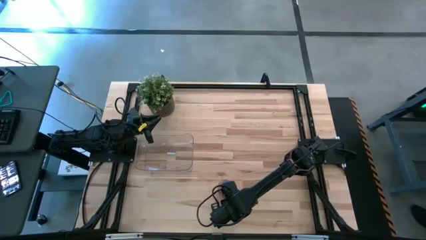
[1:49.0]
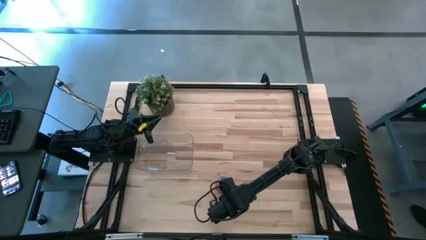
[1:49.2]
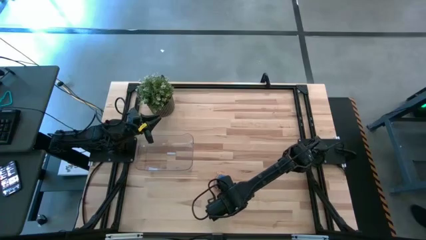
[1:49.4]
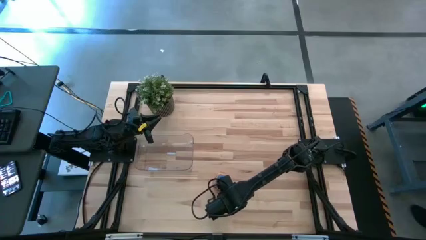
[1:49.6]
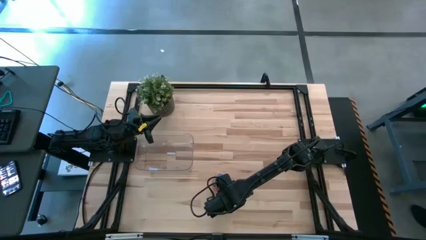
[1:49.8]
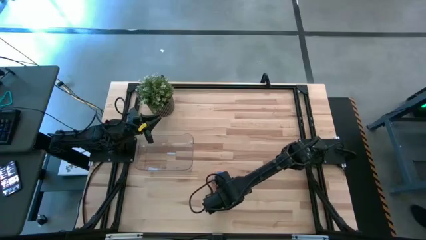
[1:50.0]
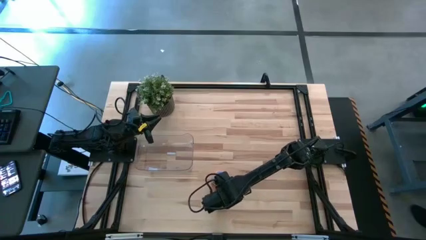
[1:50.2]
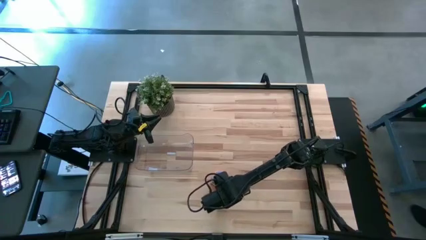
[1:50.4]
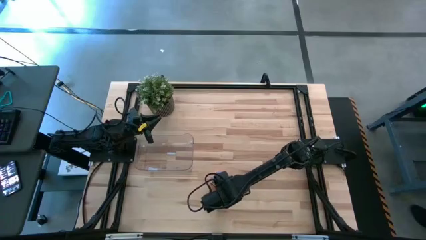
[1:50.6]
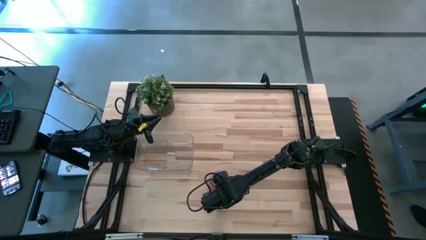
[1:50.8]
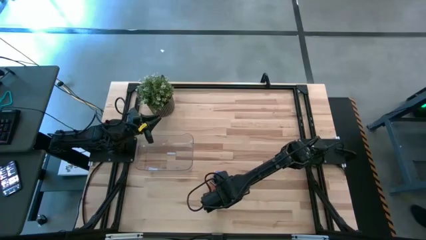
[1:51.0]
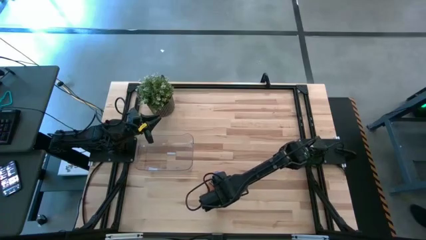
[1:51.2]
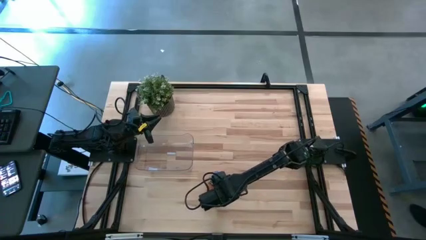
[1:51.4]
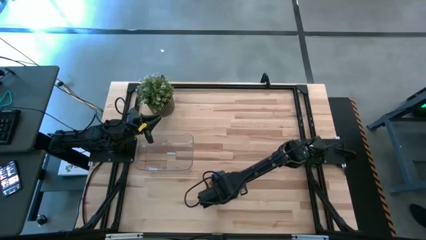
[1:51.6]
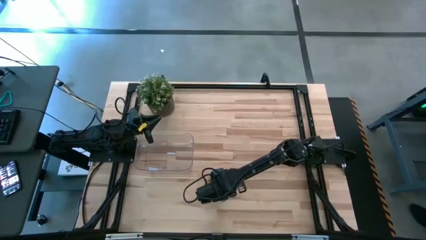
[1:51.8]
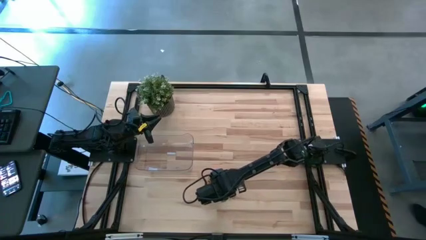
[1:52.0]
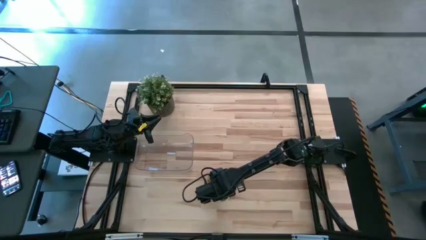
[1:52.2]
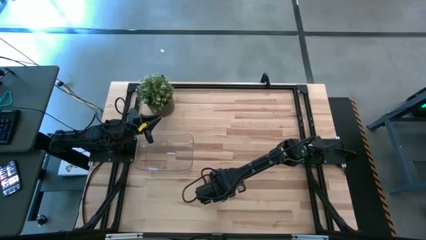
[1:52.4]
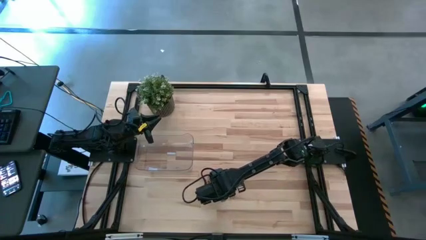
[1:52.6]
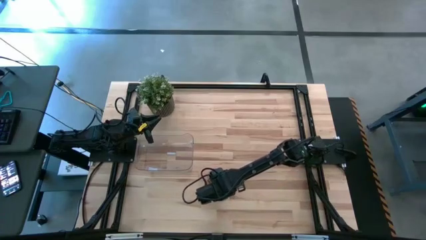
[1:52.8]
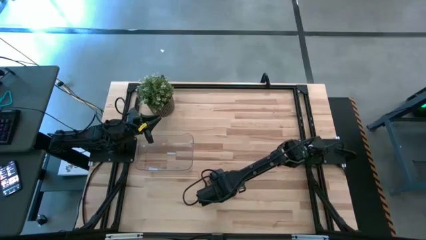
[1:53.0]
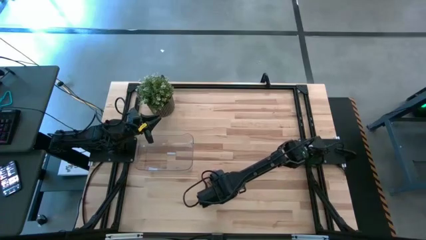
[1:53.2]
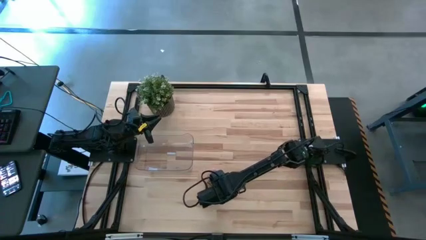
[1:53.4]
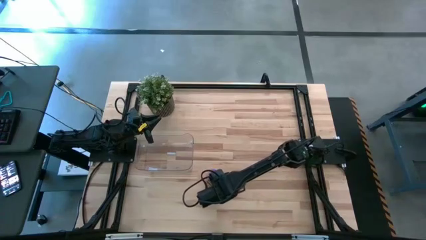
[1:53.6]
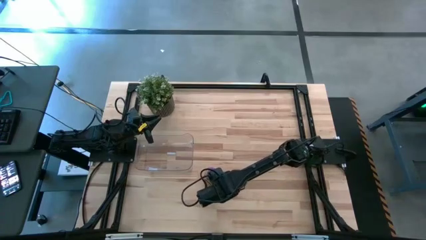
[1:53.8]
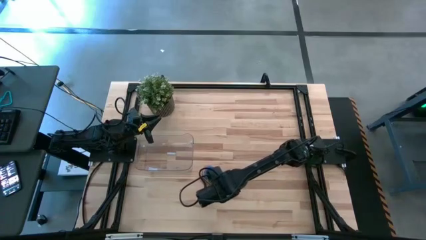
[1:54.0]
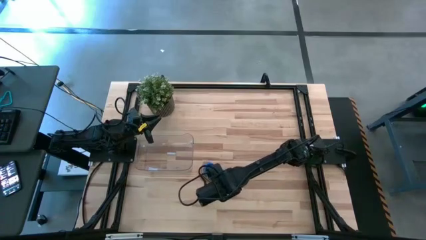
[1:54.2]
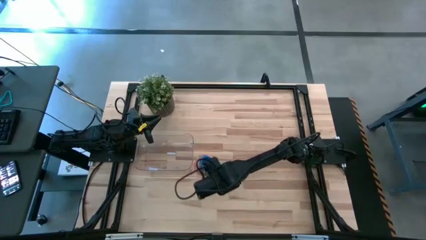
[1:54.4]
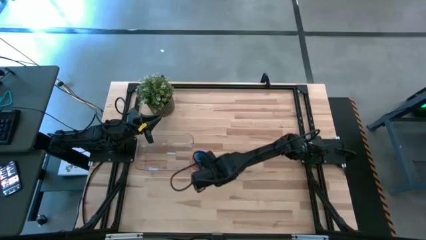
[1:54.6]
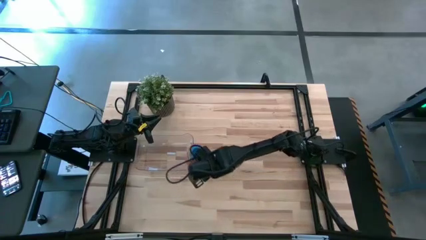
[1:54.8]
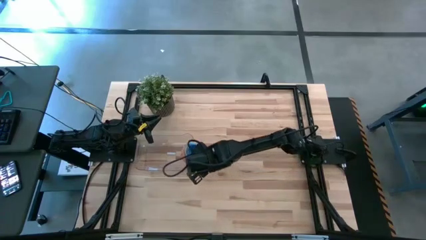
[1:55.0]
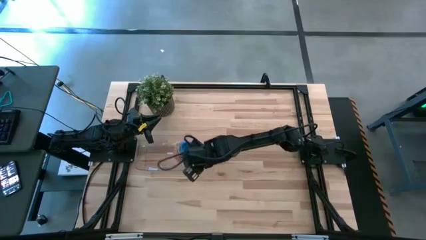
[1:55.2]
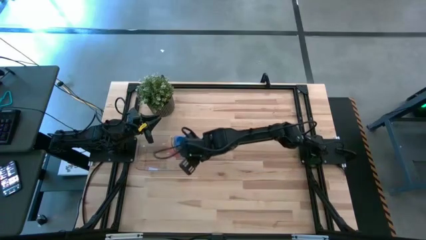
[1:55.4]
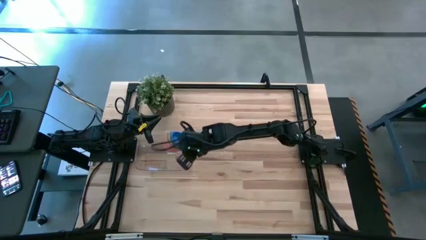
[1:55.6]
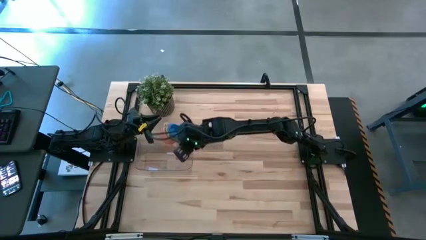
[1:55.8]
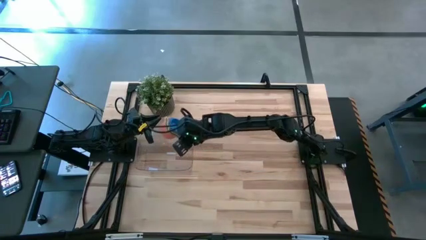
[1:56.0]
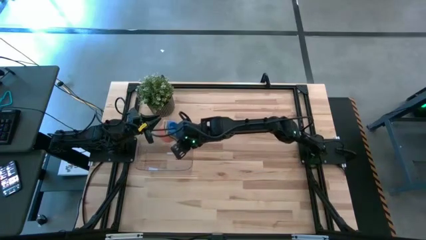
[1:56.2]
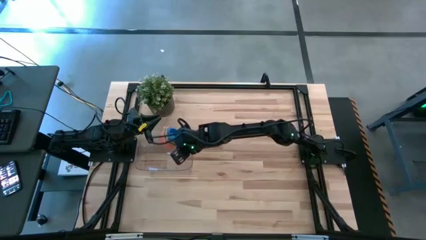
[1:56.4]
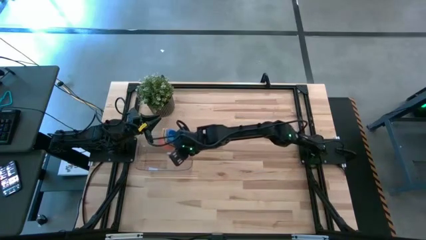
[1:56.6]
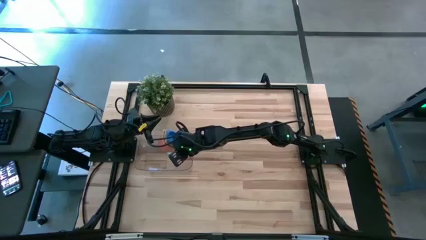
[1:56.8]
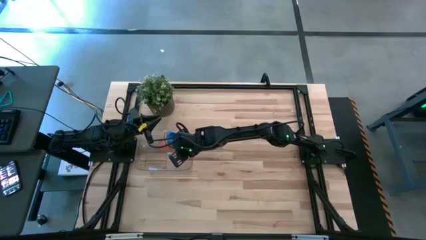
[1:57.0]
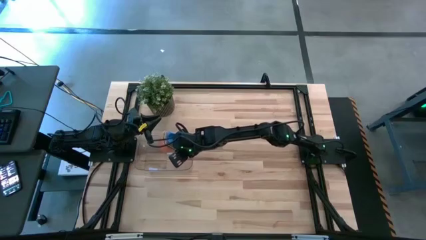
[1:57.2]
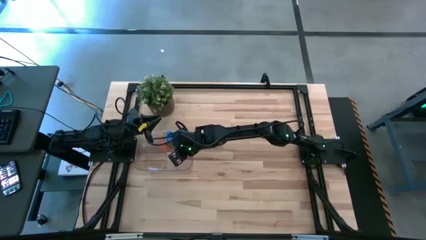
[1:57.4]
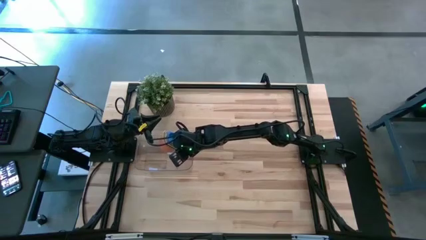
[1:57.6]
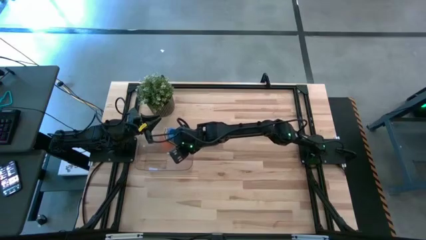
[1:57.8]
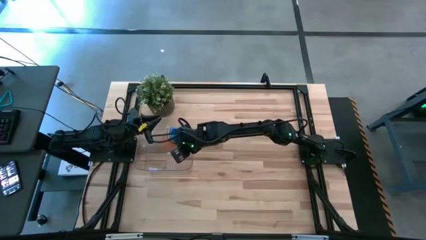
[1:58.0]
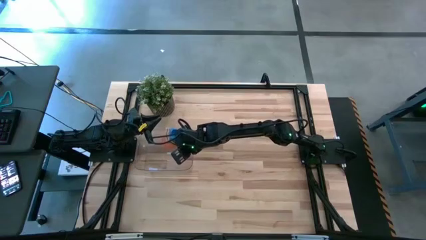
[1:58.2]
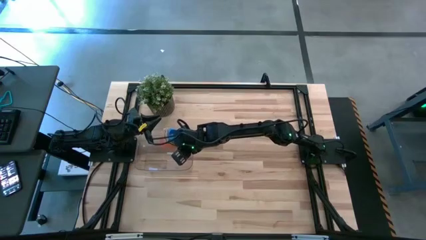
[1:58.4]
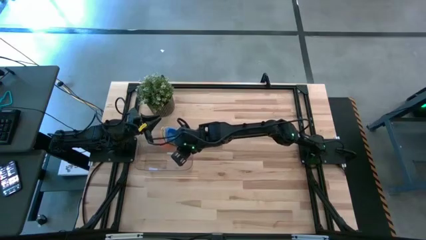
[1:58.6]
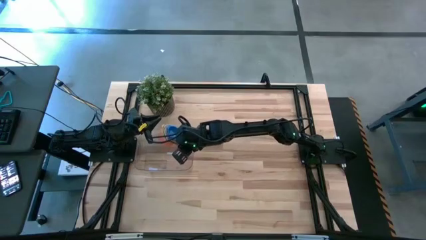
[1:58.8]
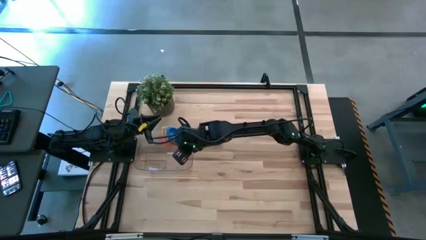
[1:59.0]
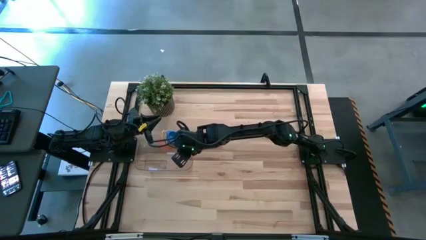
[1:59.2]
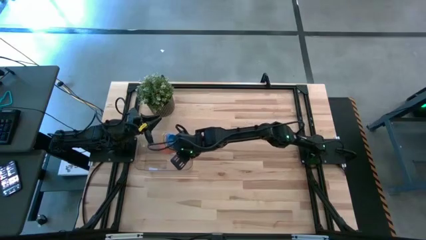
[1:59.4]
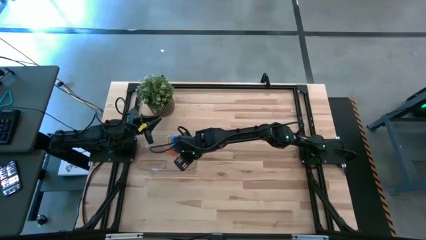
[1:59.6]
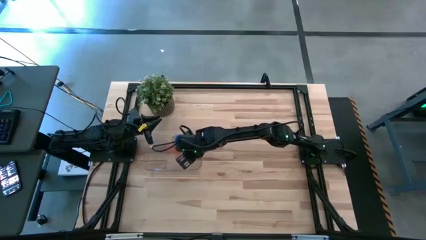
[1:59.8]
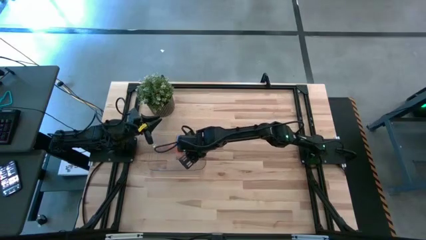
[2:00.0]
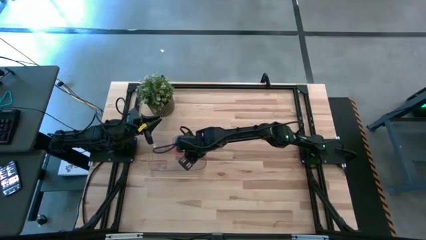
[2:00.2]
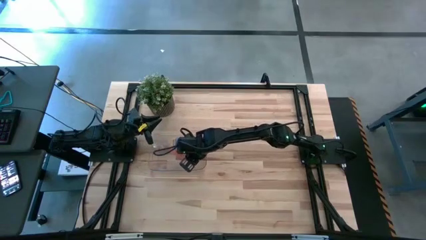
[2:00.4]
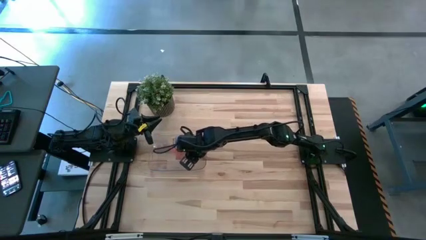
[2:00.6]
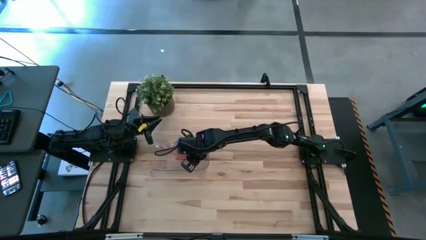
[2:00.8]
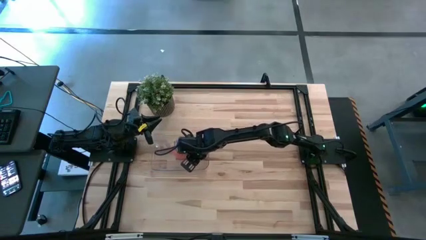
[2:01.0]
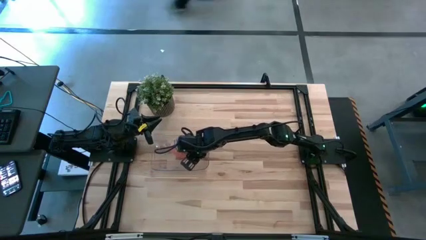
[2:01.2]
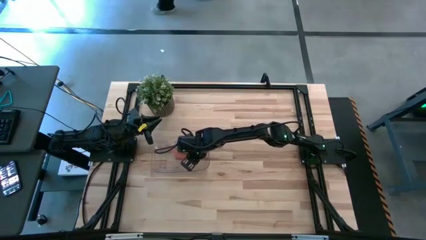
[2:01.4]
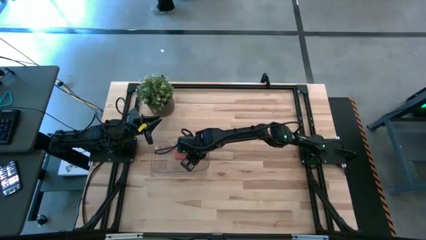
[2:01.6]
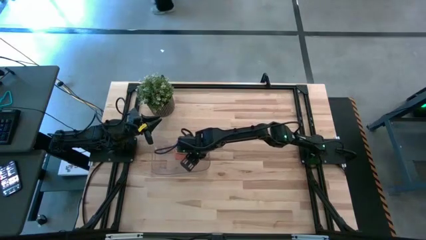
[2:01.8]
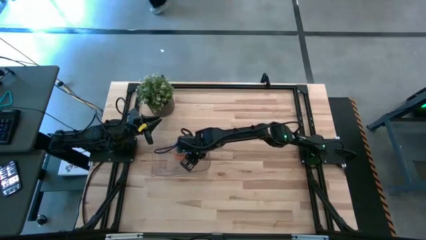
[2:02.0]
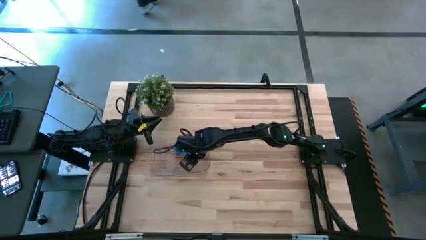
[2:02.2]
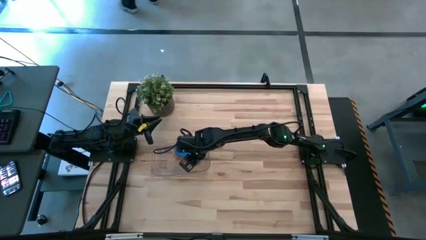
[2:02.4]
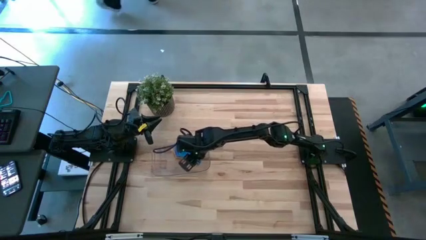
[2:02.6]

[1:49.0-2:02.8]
Task: Nest measuring cups in basket
Put the nested measuring cups into the transparent bin

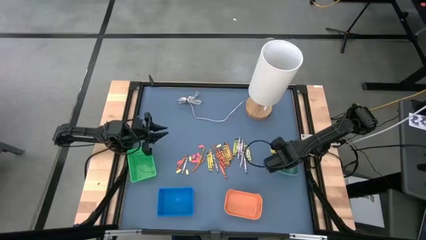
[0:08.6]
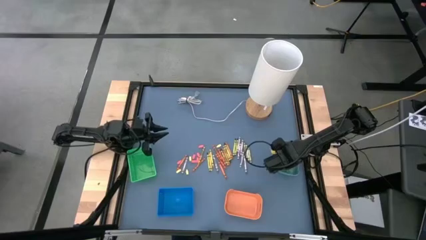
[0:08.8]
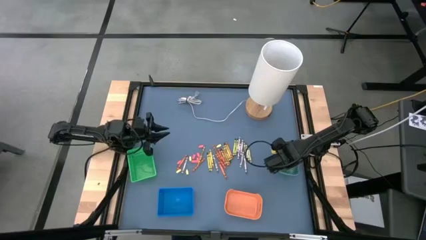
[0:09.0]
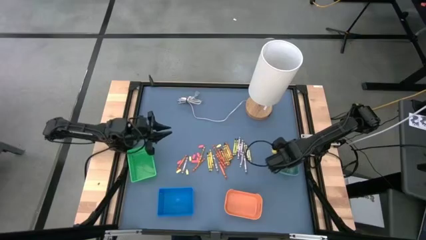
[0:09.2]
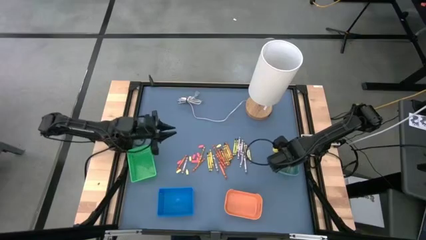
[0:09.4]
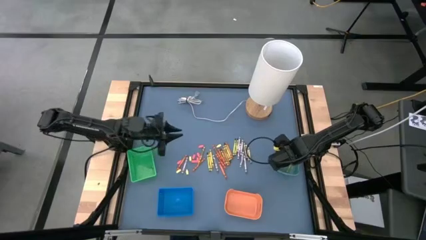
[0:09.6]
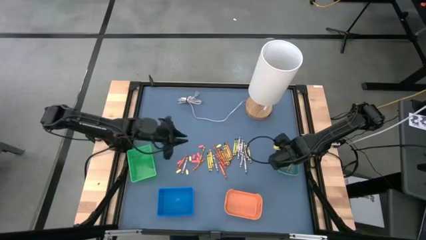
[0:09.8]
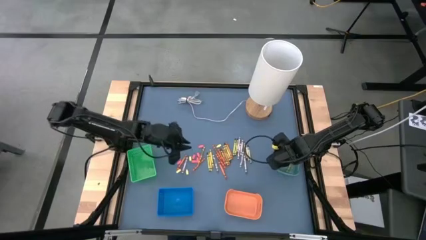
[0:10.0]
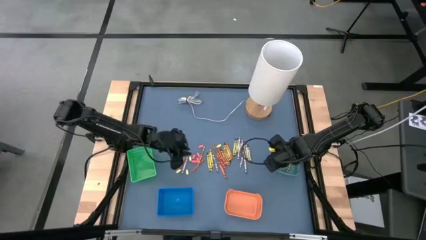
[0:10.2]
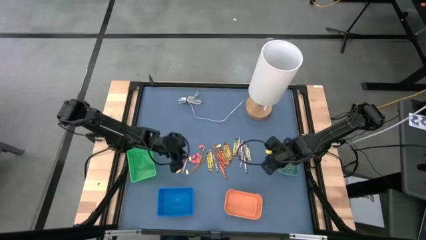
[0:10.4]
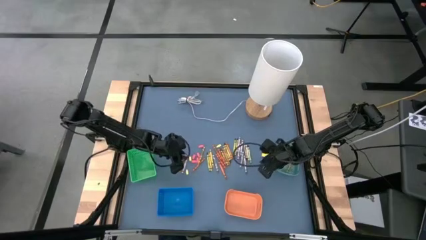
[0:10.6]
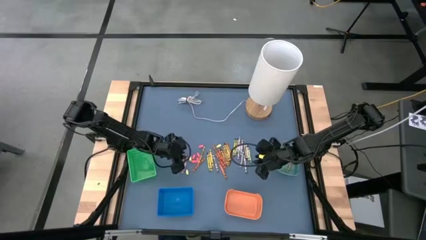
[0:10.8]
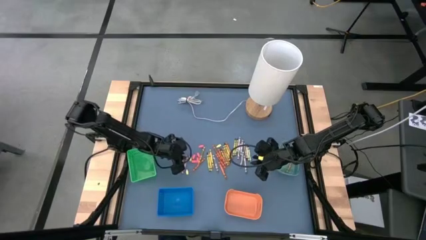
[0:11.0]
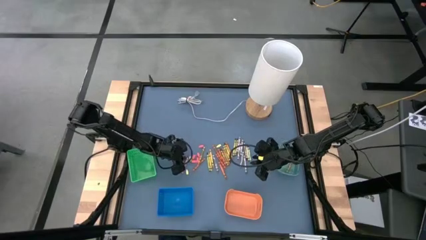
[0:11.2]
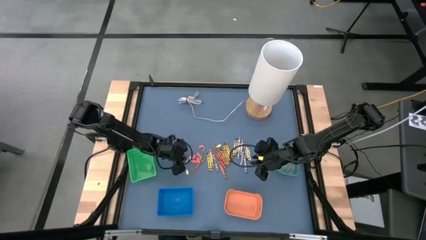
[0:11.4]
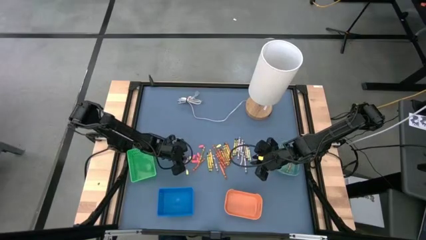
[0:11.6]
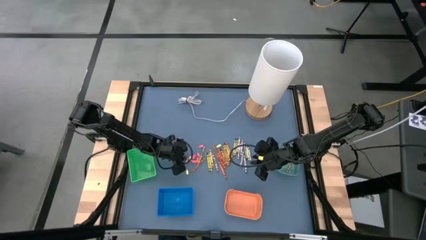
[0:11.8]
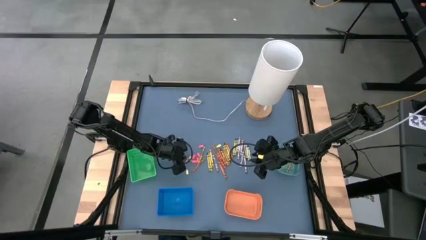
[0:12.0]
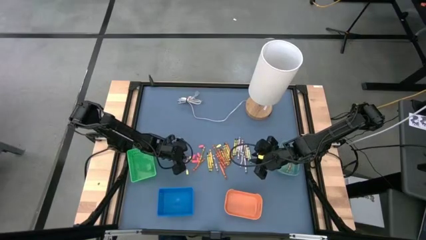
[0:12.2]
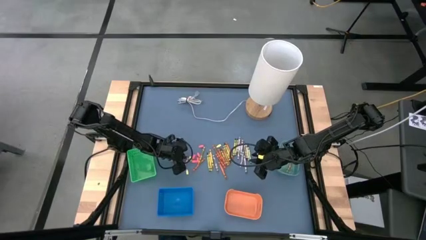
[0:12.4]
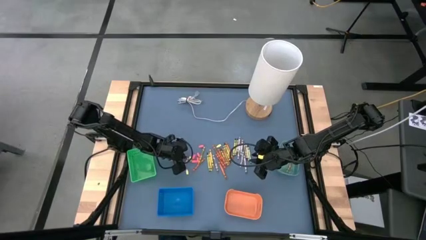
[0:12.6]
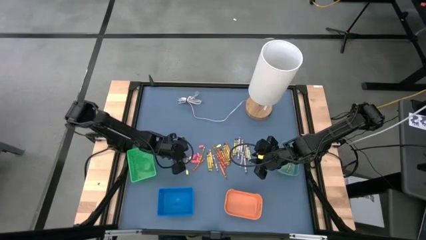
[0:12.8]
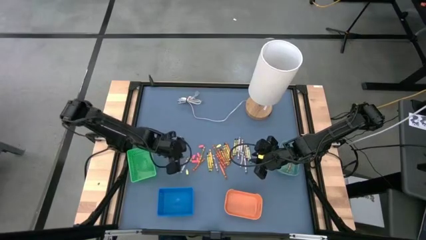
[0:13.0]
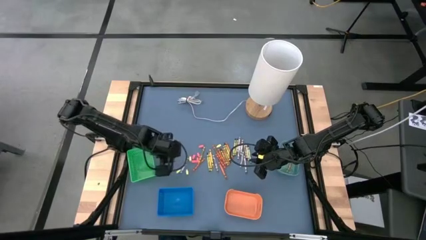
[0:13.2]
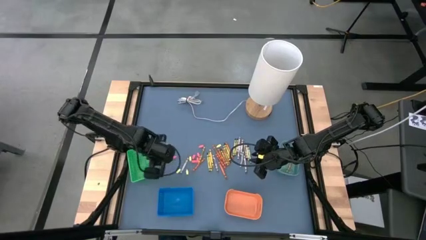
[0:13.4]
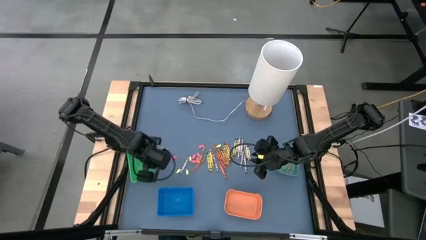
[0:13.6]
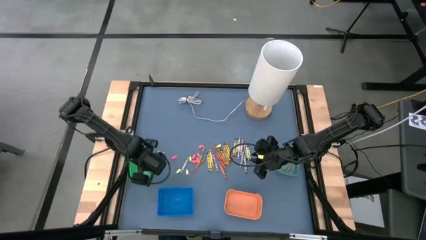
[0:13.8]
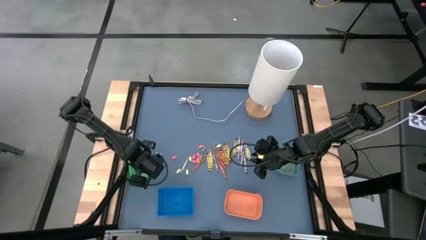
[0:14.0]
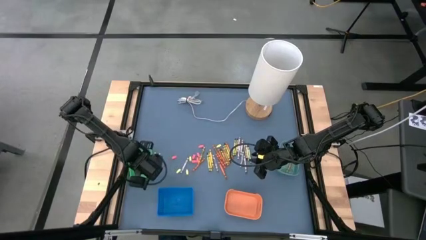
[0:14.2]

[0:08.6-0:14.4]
Task: Sort crayons
Put the orange crayon into the green bin
